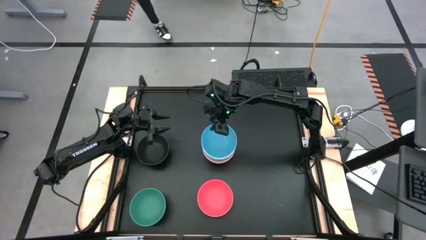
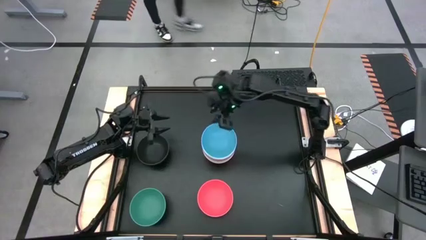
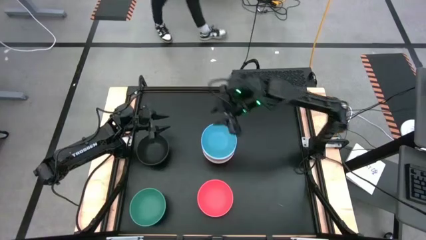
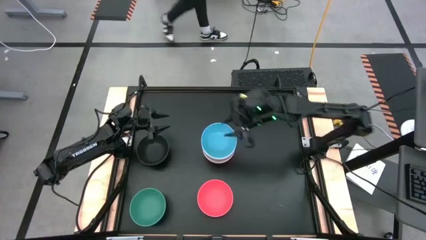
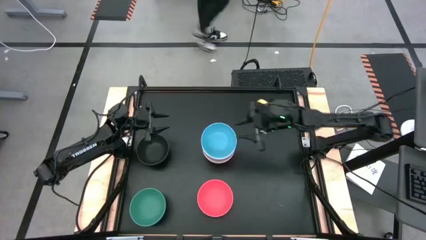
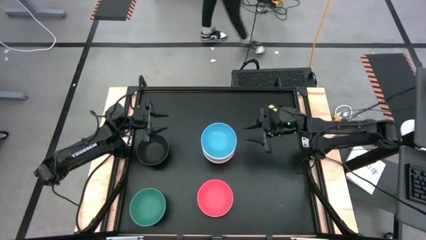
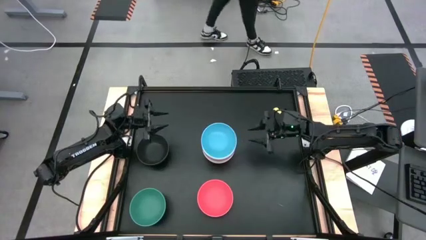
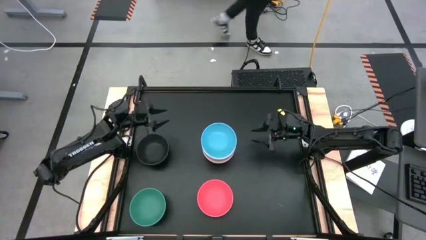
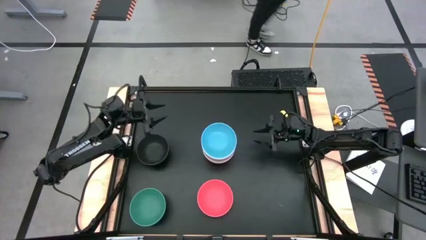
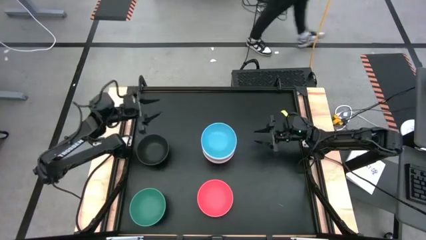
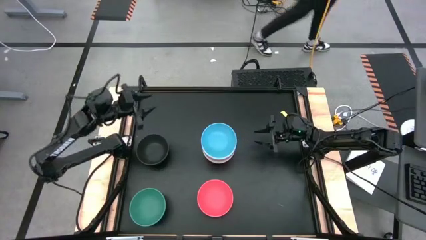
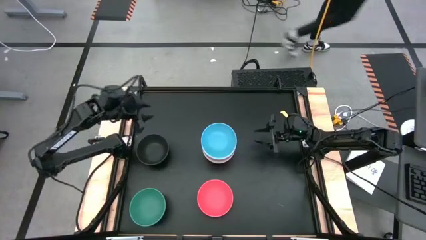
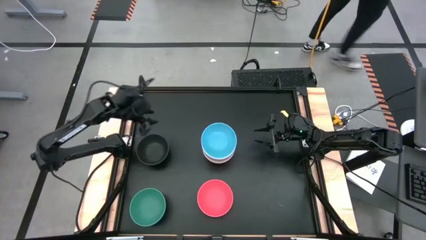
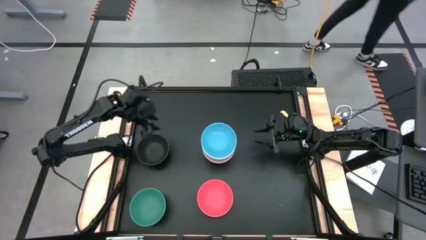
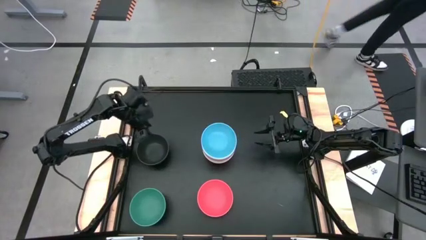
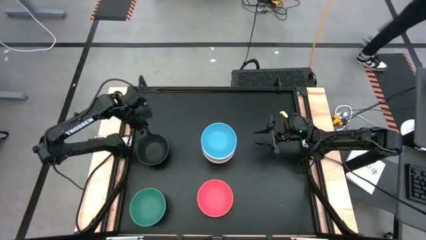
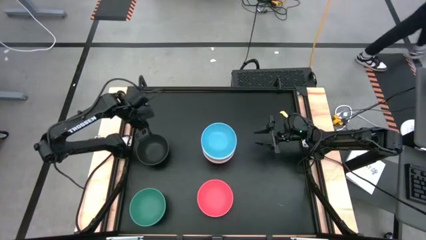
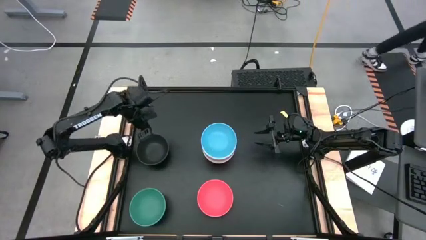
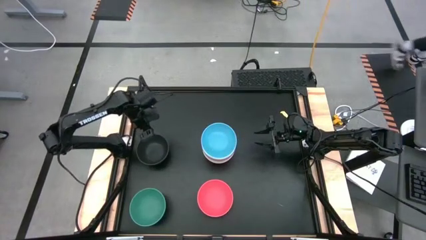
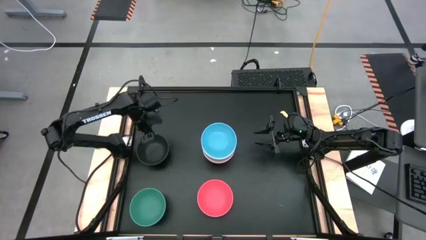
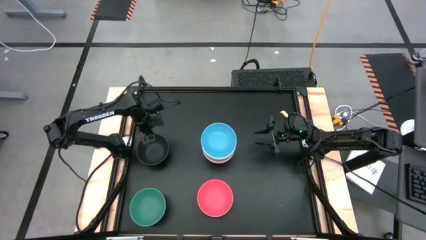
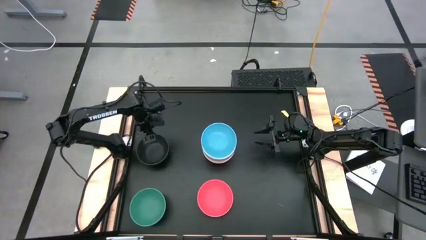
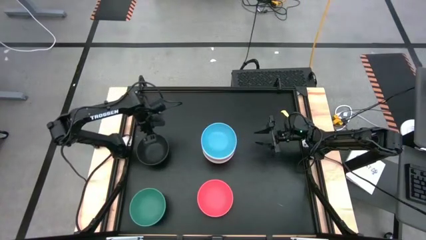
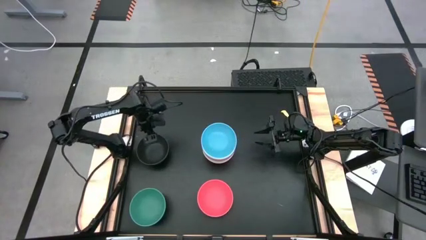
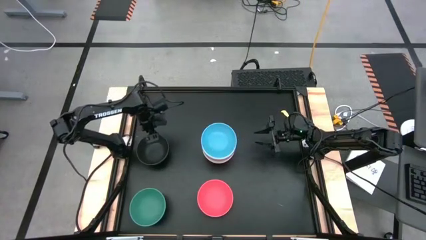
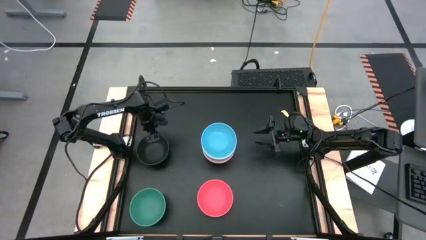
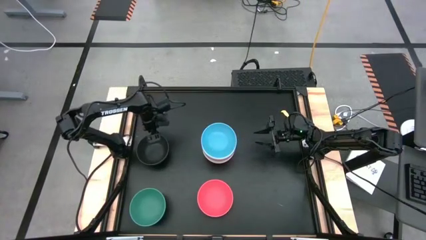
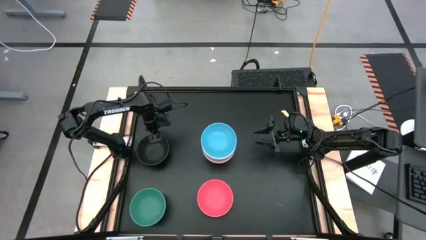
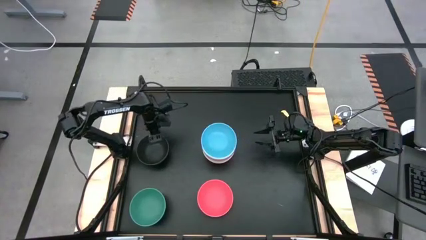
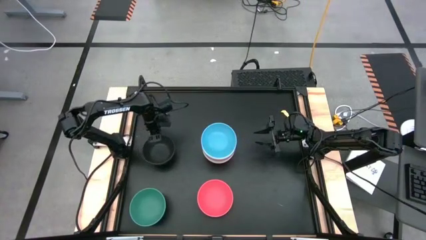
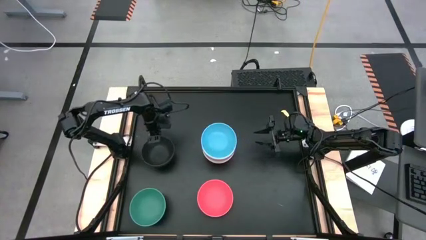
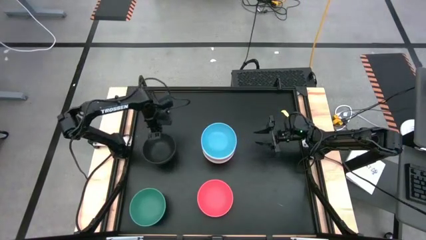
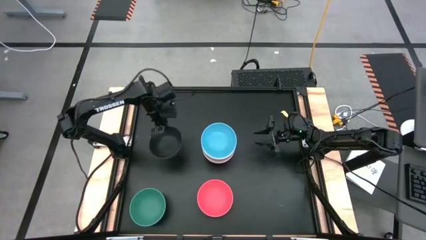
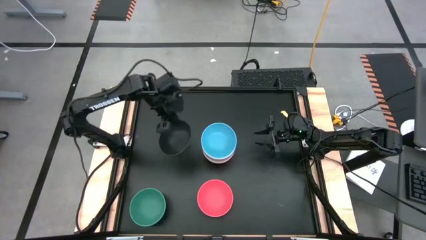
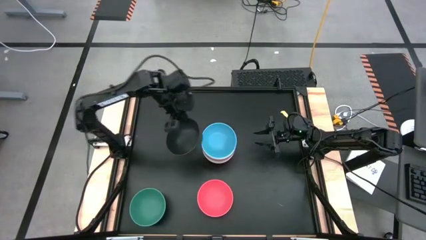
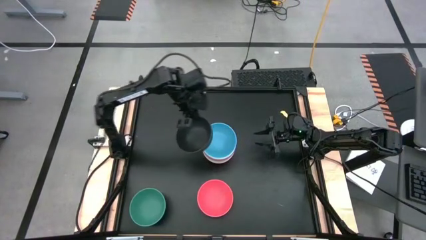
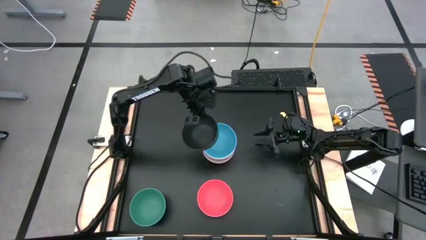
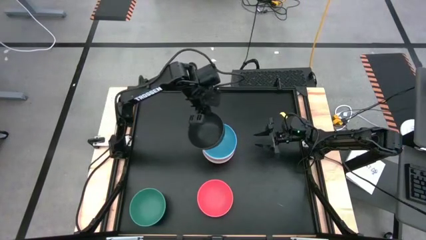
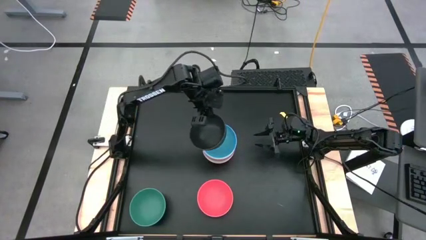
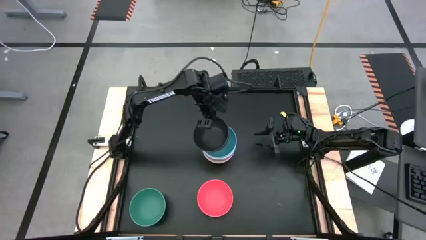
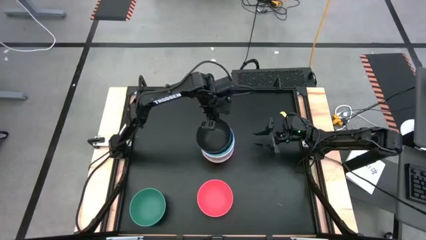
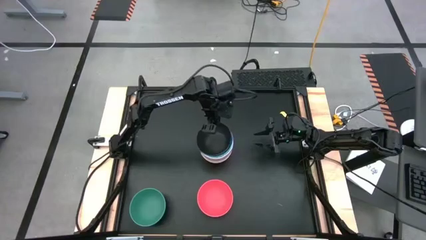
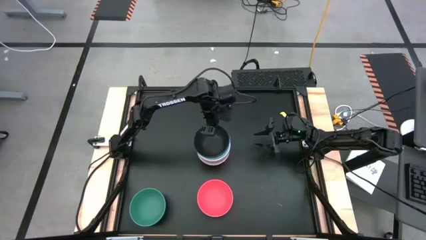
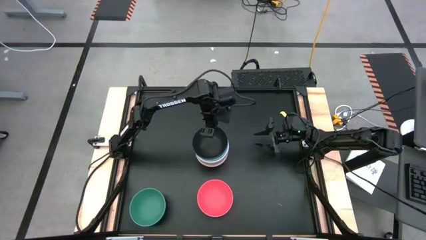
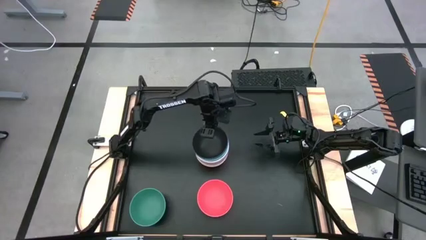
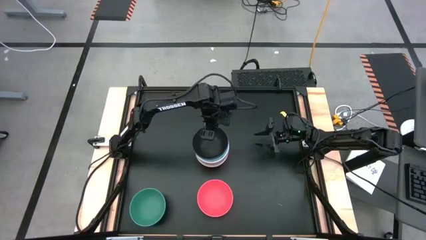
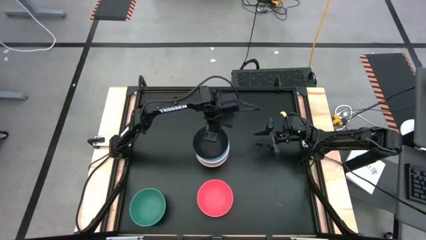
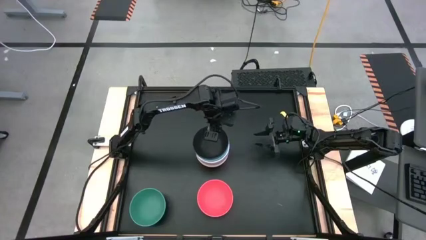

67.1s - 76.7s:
Task: Nest bowls inside each other
Stack the black bowl on top of the blue bowl

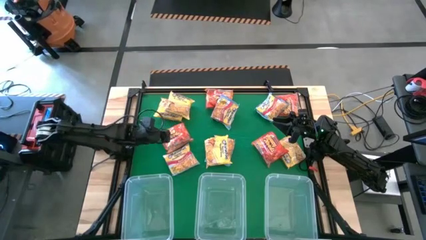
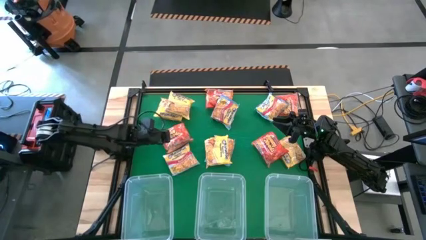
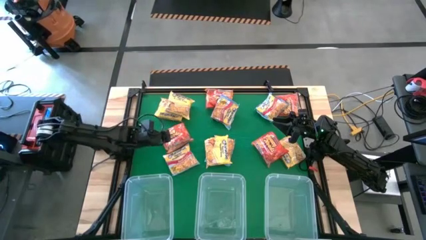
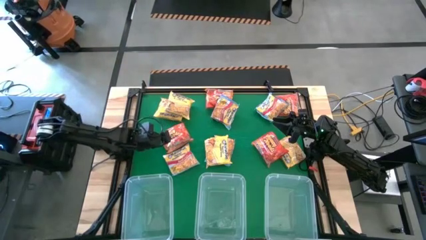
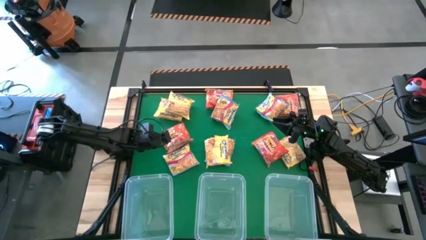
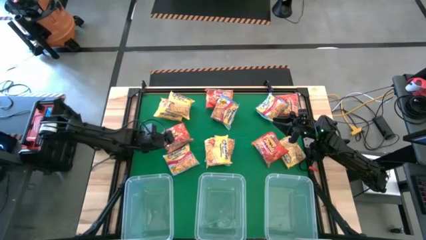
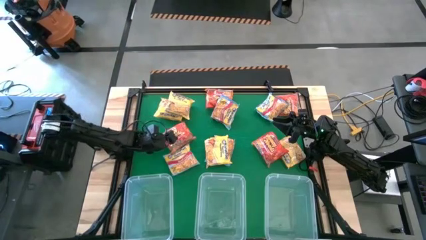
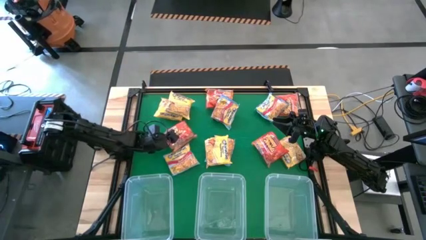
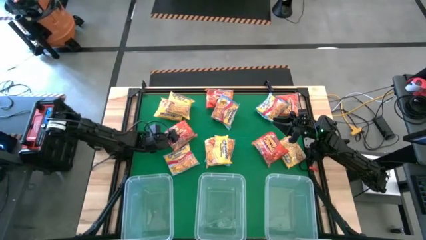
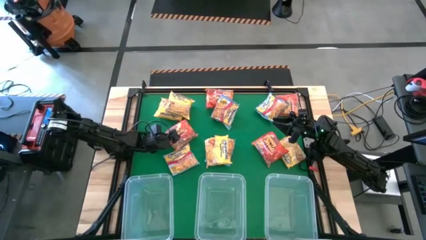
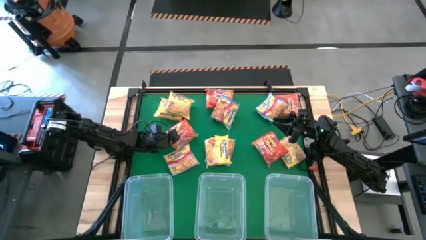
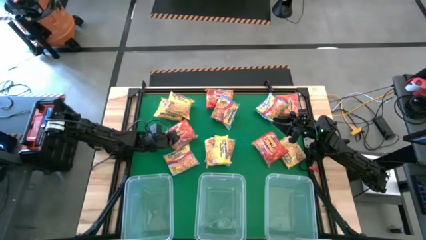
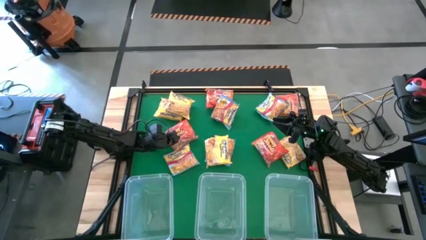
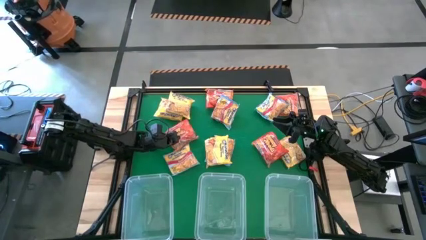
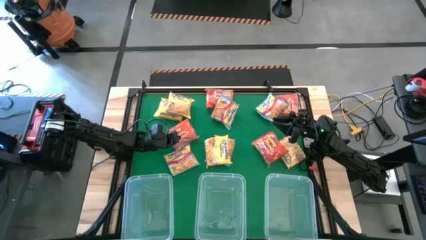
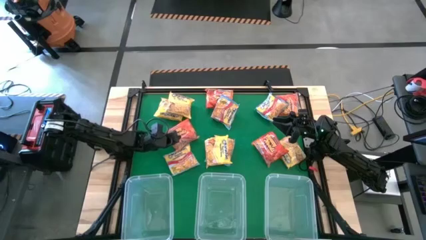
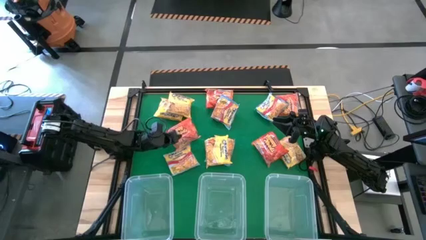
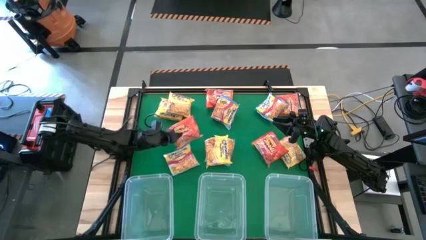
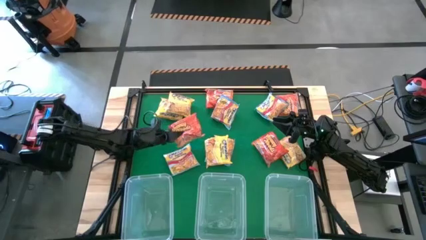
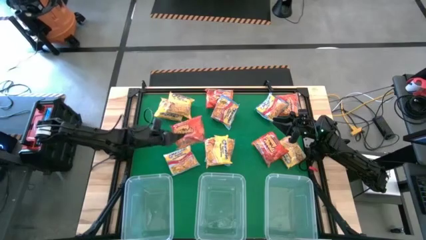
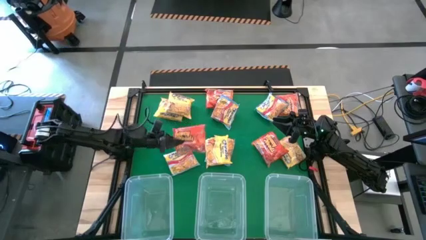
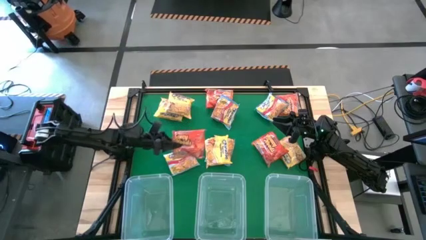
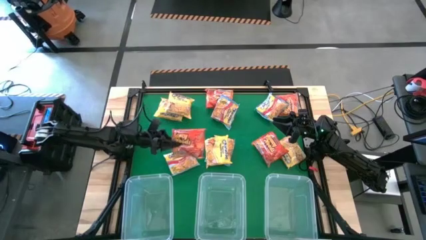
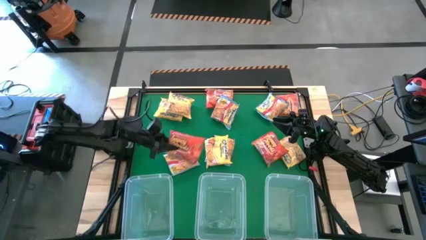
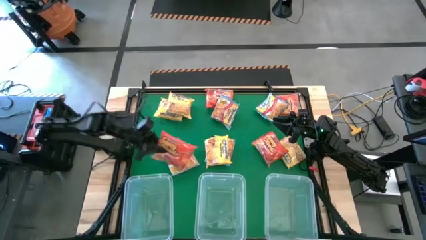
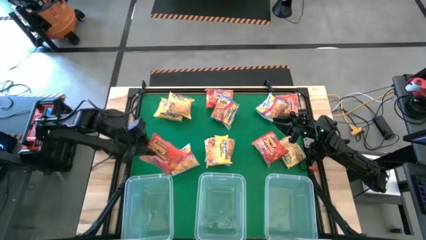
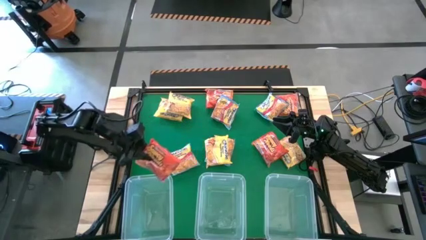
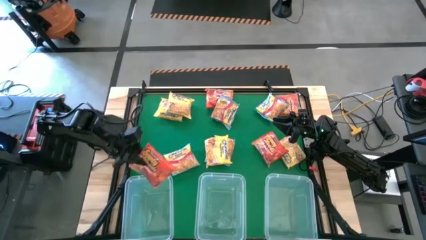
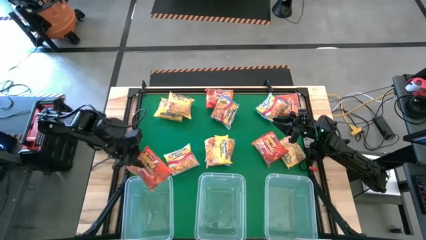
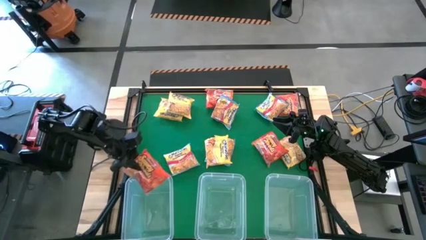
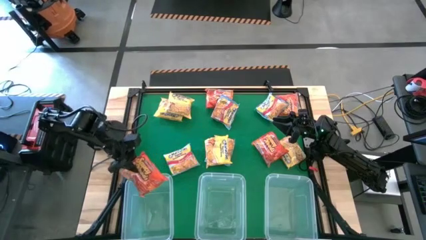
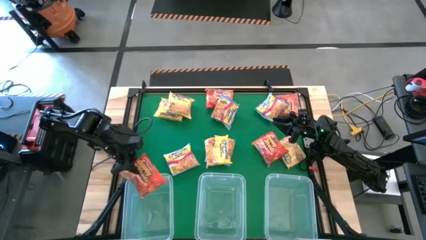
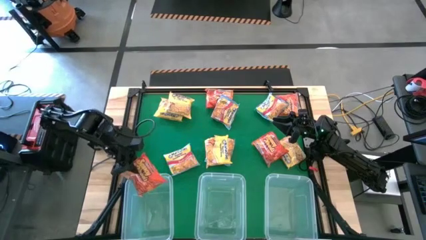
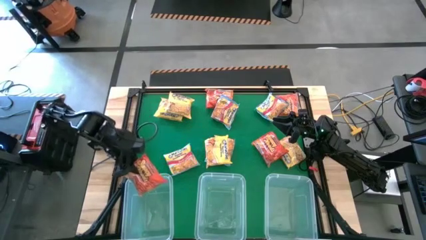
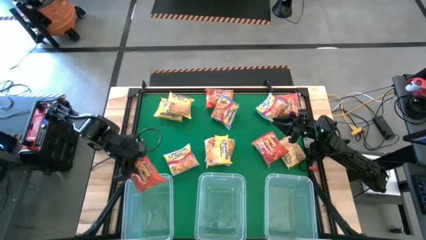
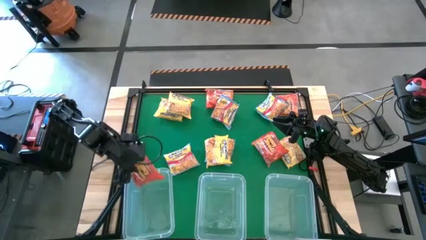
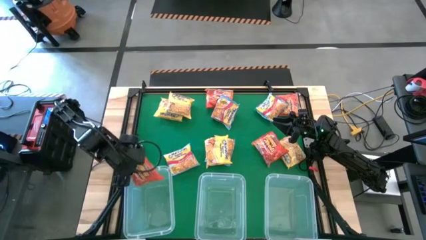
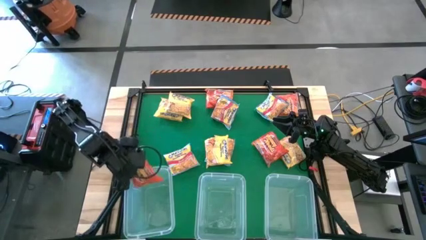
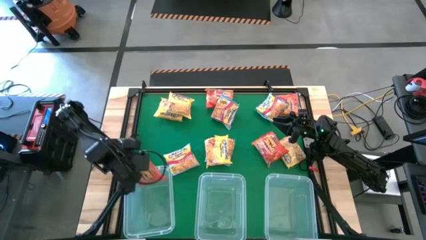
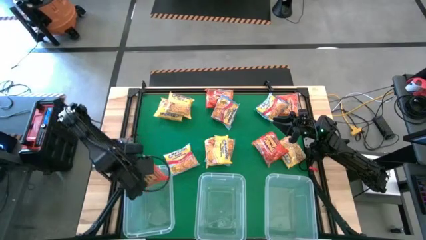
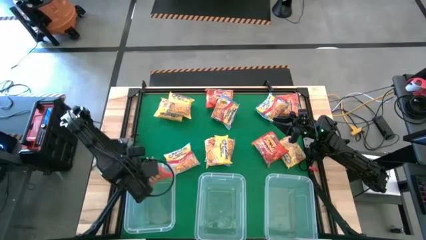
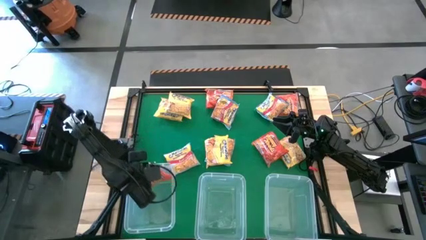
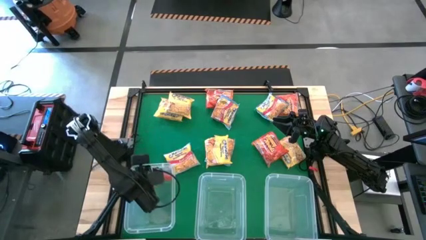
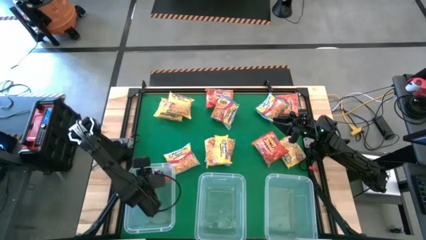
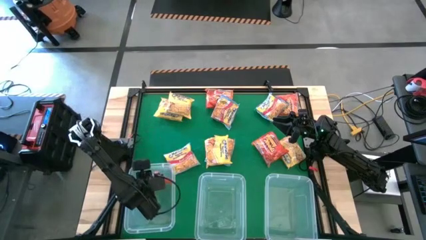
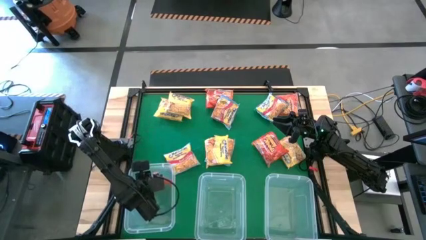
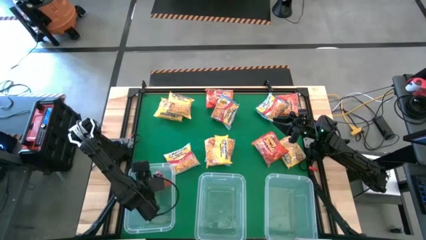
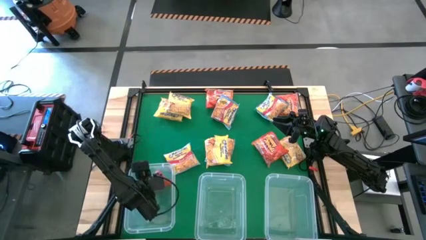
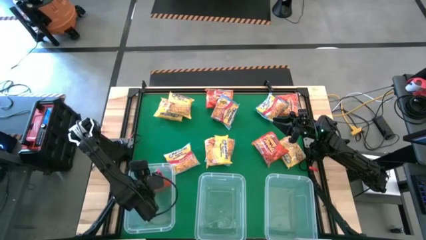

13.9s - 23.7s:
Task: Sort Maruchan noodles
Put the orange noodle pack into the left transparent bin
